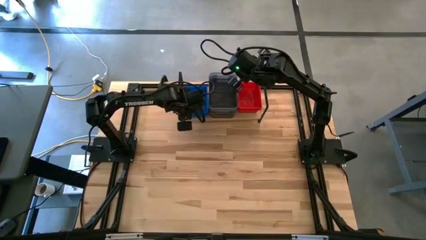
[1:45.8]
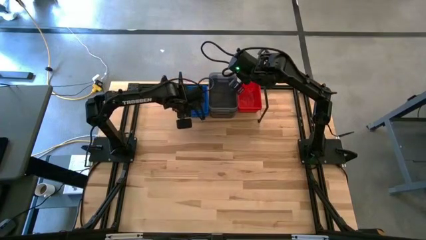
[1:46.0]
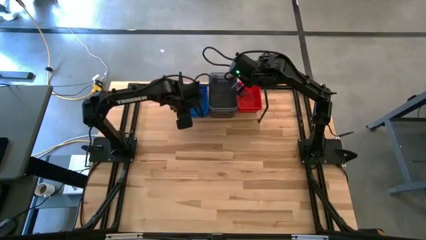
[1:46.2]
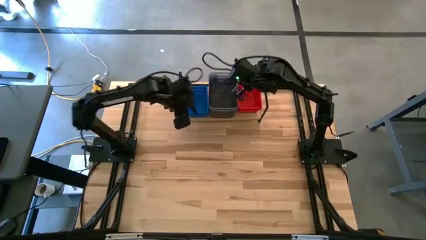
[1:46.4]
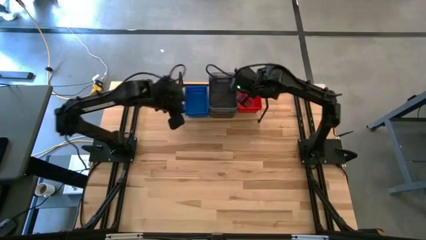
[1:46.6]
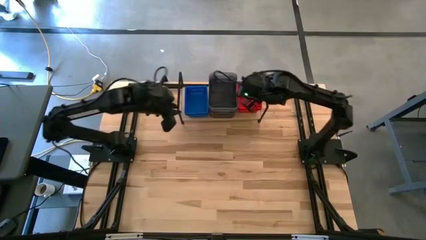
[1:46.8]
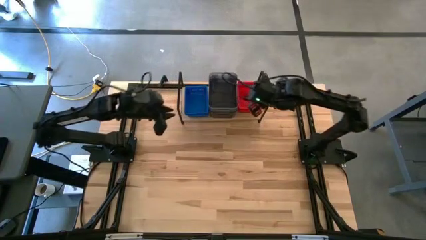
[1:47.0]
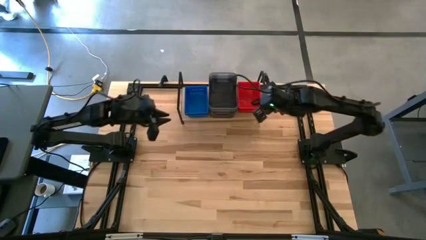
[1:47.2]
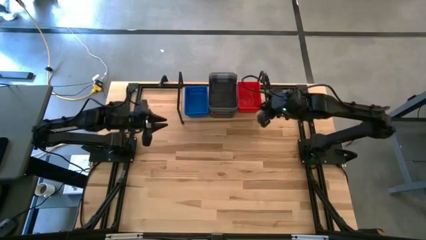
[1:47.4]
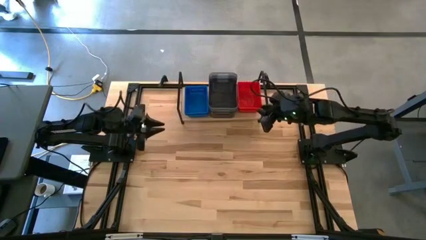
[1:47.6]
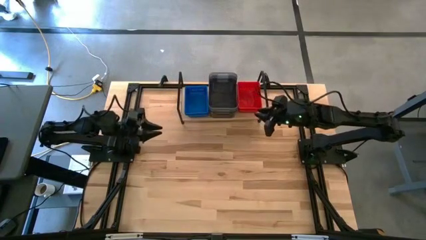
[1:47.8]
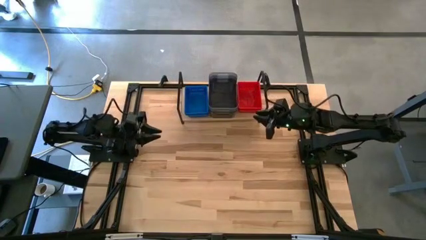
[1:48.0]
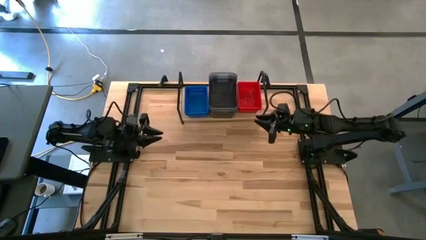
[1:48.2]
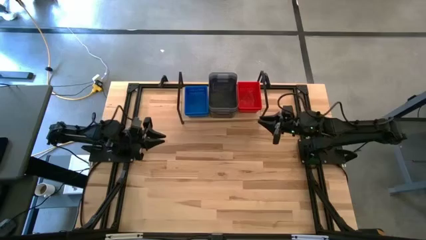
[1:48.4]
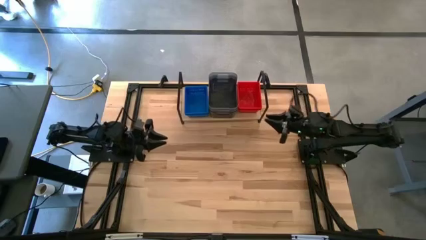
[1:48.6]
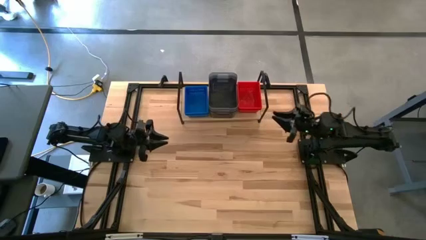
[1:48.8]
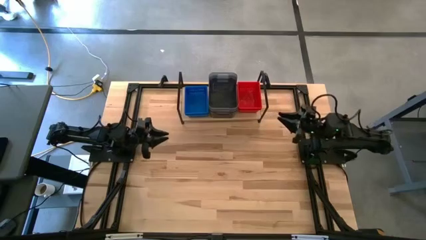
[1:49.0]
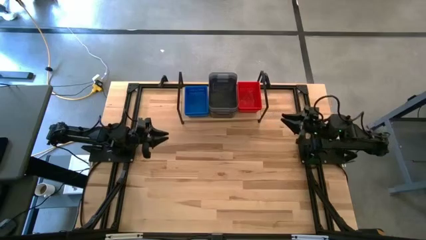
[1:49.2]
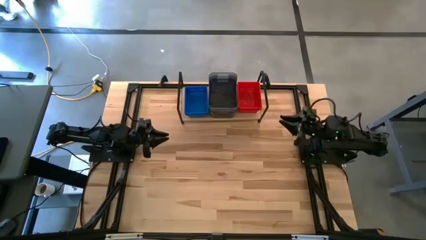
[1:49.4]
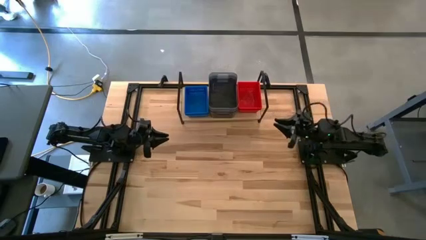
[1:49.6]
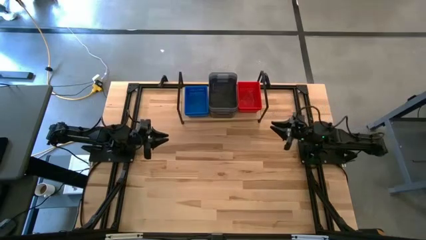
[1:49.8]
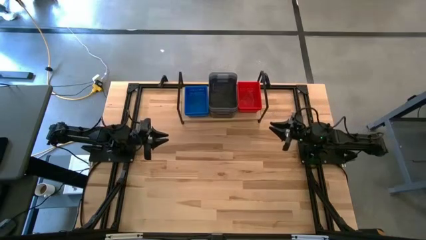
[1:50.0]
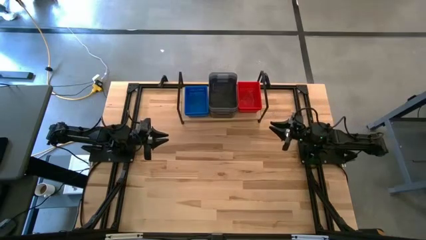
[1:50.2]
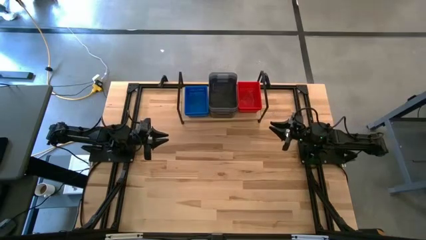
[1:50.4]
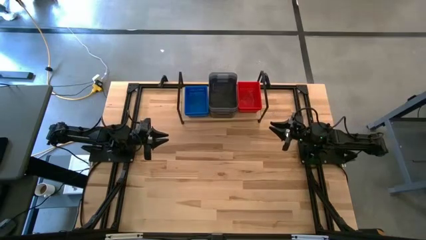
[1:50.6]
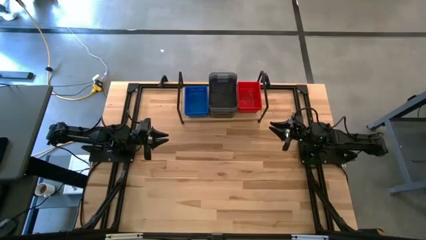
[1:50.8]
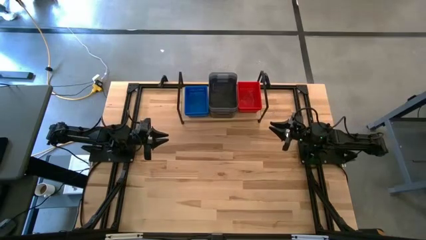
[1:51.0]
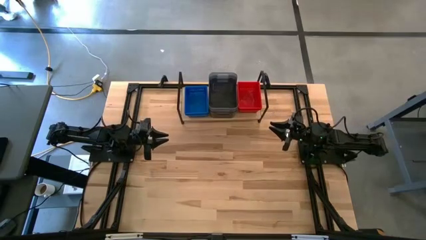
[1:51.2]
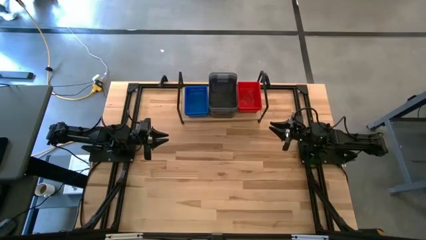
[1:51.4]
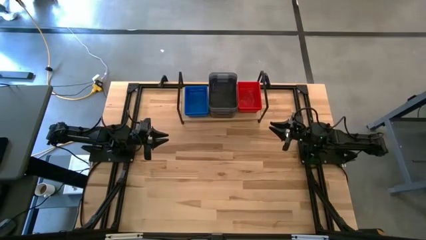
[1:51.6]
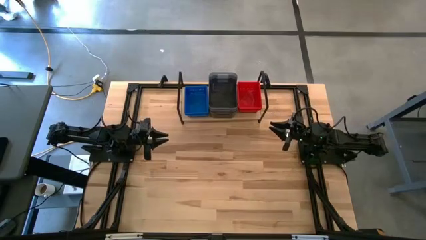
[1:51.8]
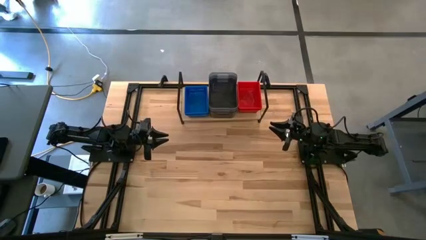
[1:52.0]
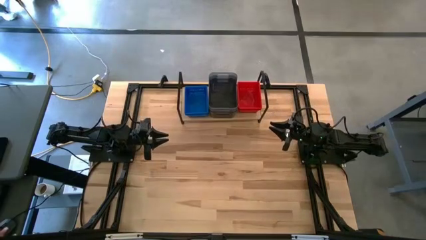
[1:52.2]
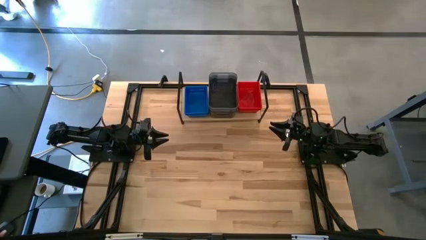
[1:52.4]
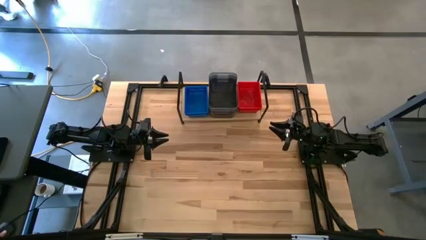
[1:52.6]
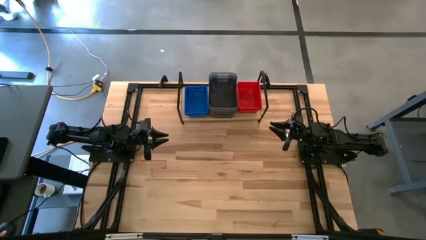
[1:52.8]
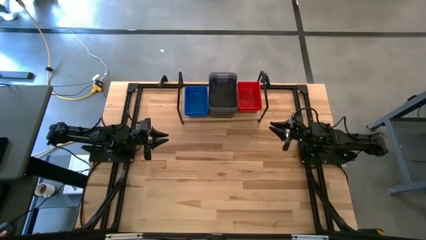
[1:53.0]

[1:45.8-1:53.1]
Task: Stack baskets on shelf by color
Return to Home Position

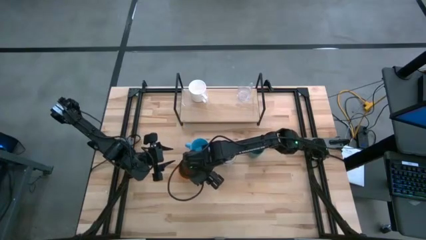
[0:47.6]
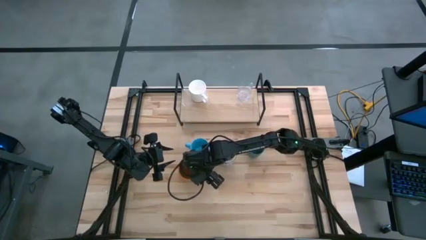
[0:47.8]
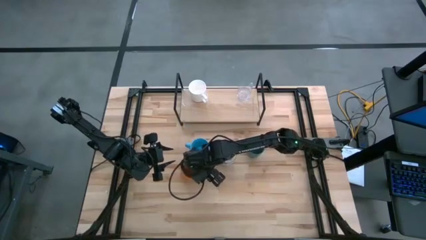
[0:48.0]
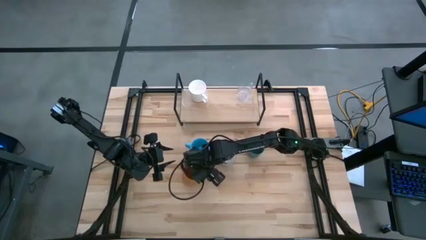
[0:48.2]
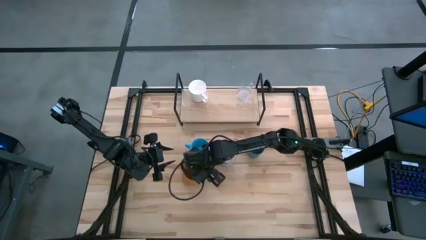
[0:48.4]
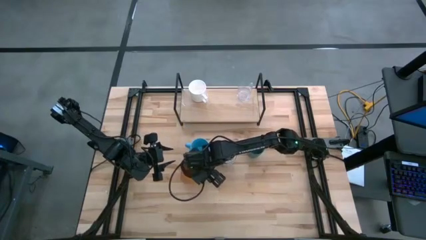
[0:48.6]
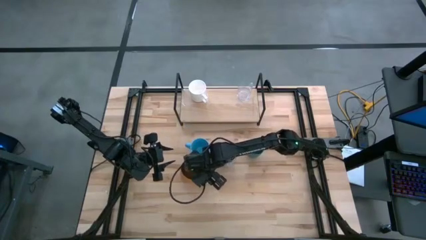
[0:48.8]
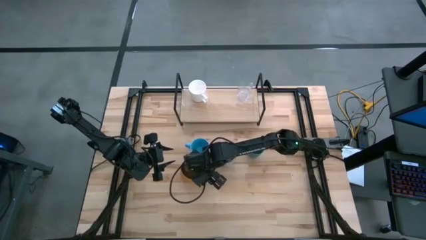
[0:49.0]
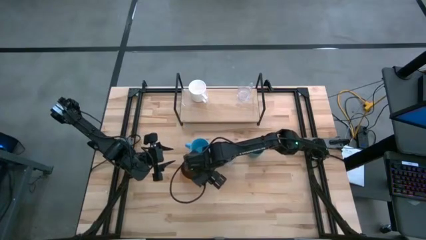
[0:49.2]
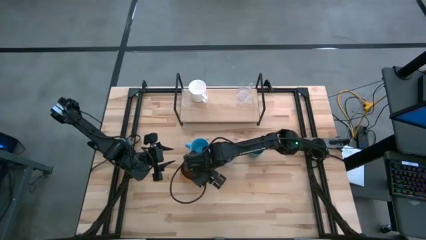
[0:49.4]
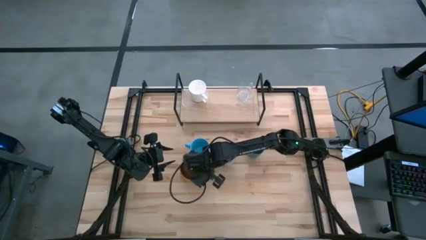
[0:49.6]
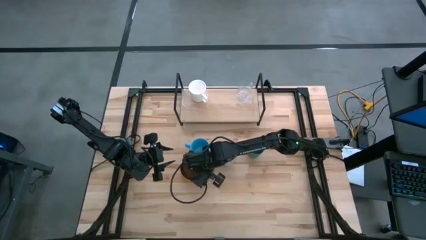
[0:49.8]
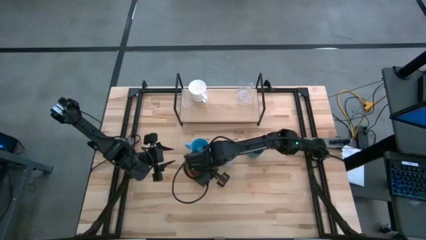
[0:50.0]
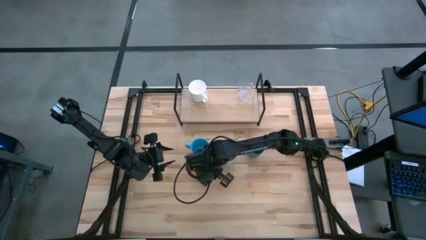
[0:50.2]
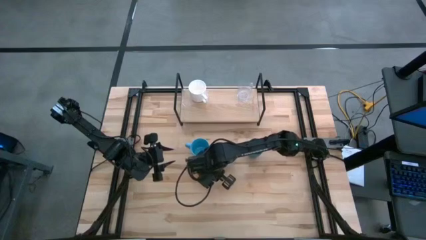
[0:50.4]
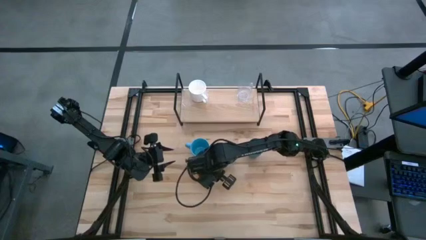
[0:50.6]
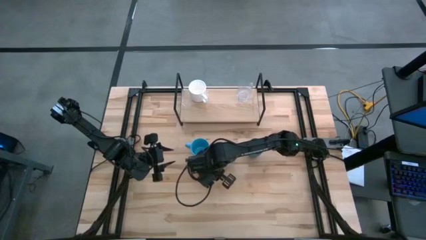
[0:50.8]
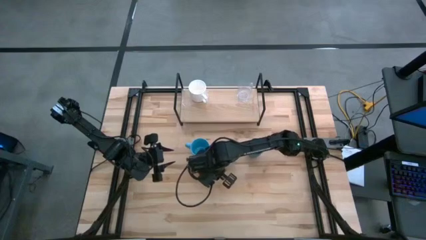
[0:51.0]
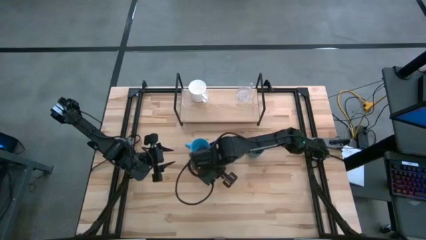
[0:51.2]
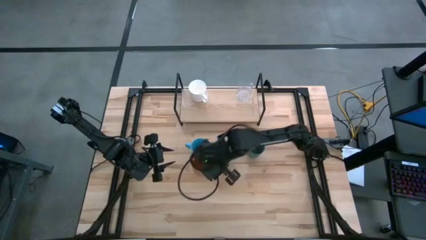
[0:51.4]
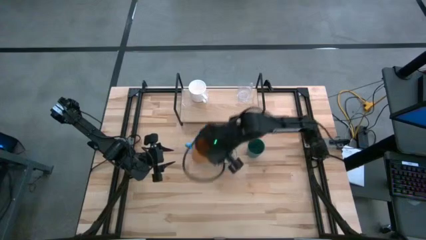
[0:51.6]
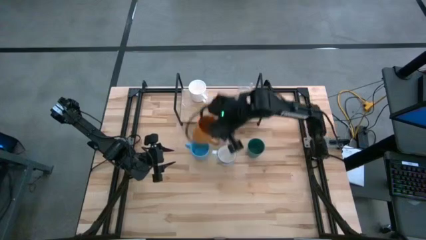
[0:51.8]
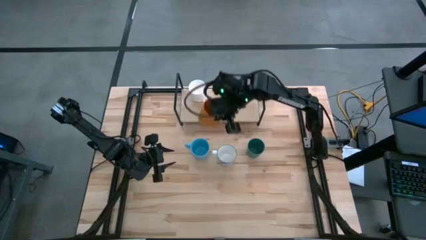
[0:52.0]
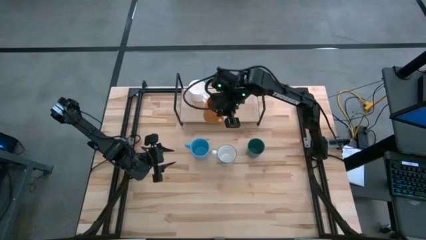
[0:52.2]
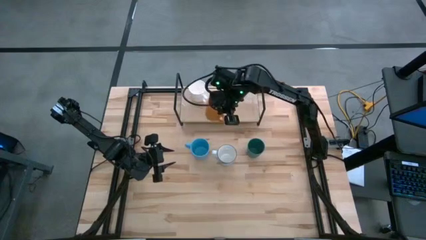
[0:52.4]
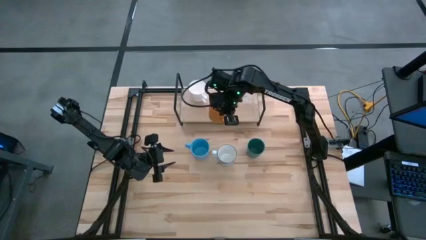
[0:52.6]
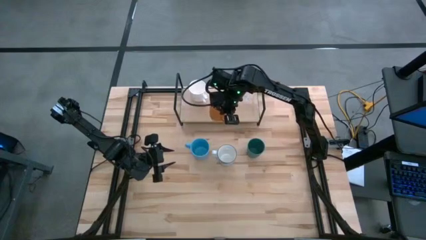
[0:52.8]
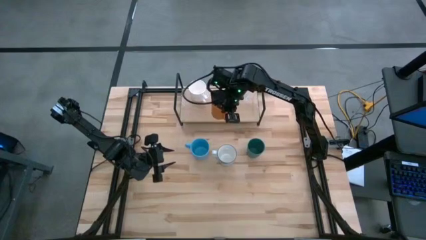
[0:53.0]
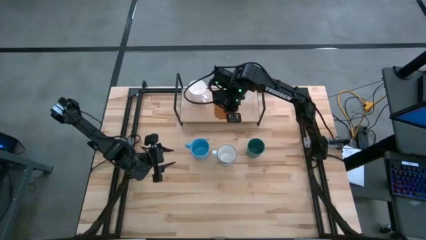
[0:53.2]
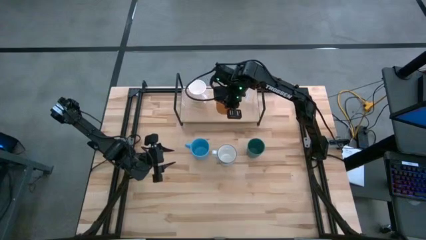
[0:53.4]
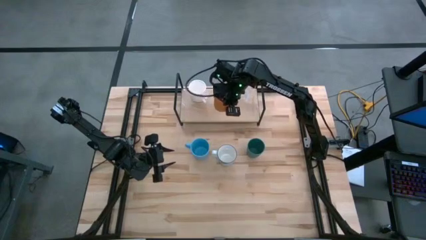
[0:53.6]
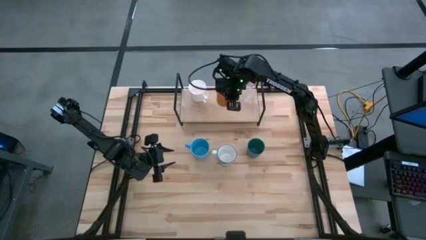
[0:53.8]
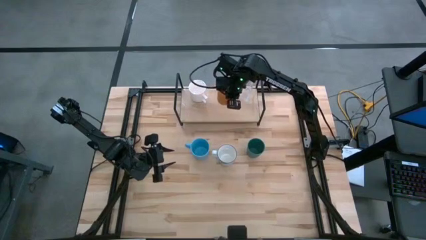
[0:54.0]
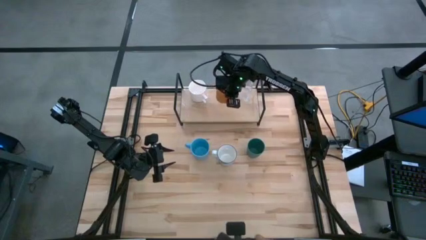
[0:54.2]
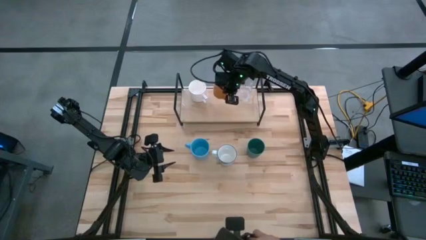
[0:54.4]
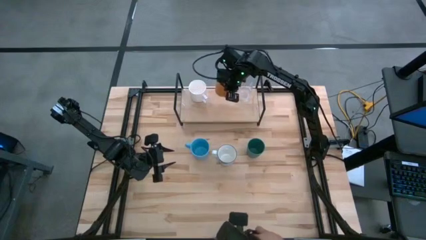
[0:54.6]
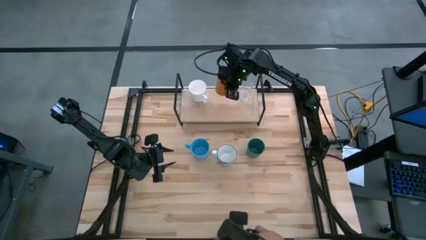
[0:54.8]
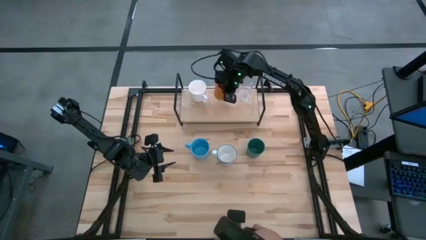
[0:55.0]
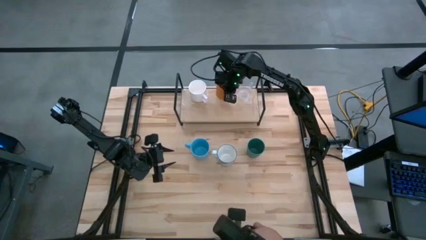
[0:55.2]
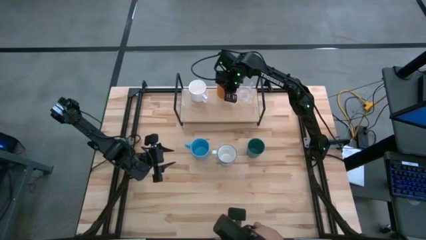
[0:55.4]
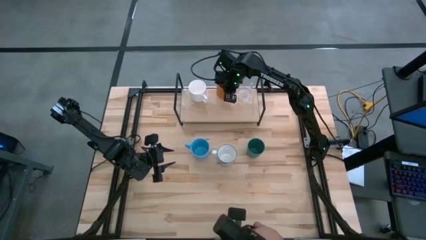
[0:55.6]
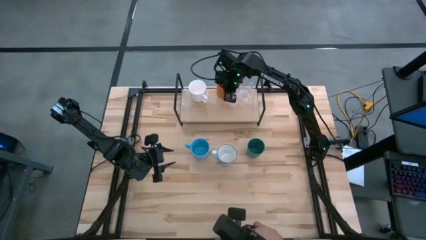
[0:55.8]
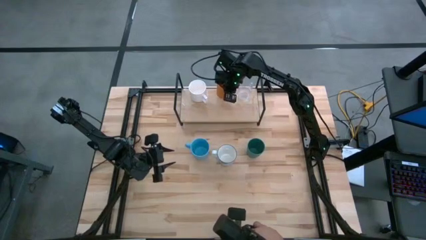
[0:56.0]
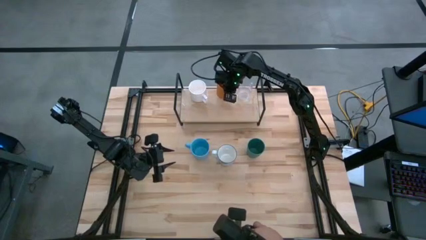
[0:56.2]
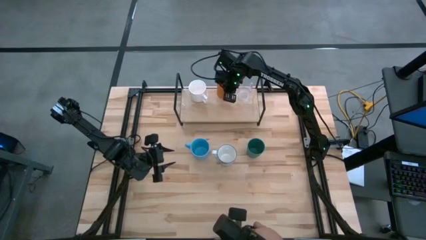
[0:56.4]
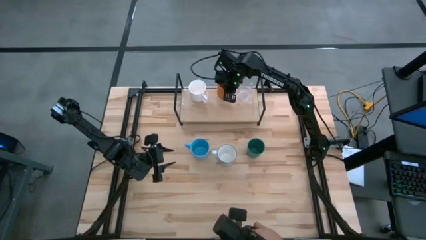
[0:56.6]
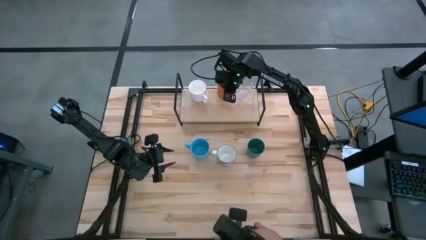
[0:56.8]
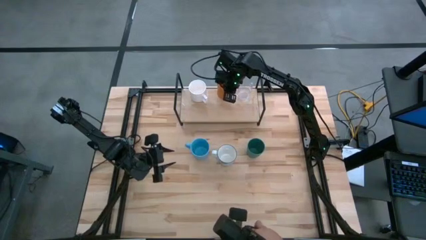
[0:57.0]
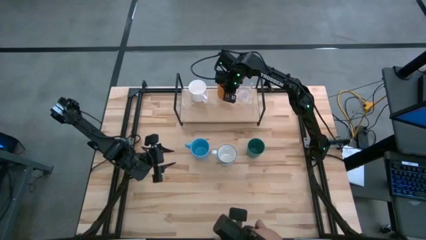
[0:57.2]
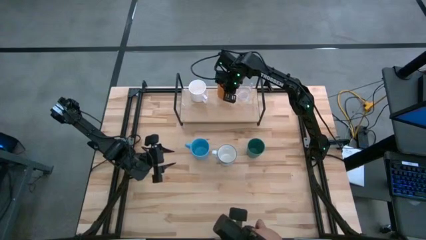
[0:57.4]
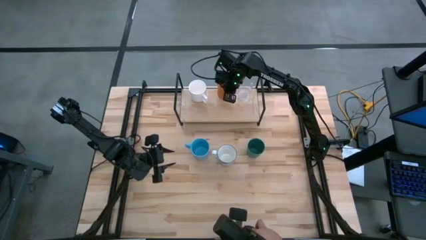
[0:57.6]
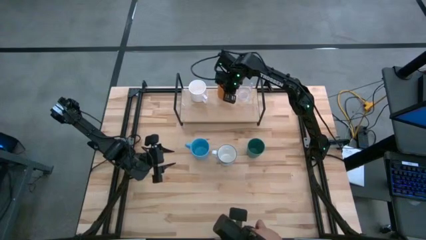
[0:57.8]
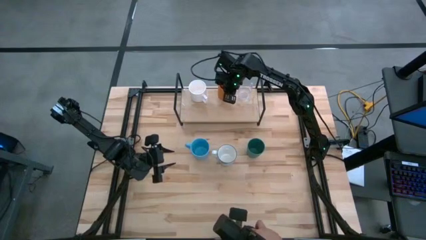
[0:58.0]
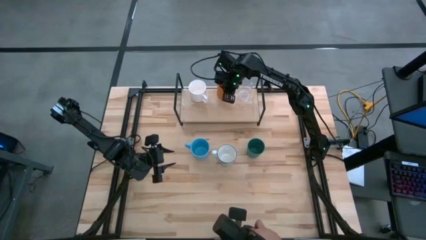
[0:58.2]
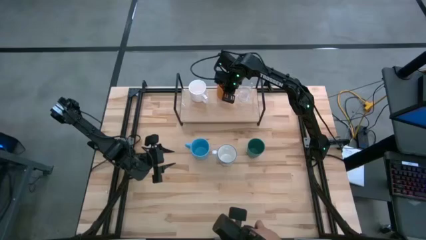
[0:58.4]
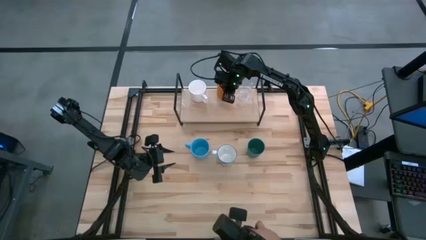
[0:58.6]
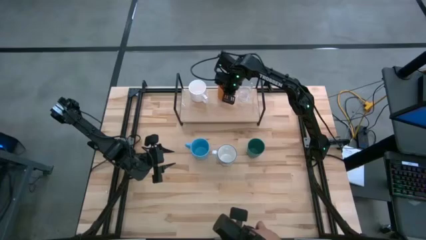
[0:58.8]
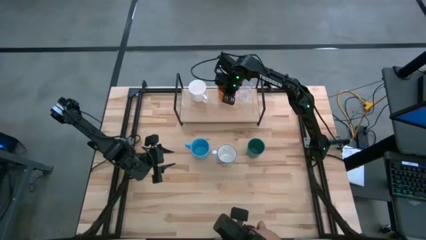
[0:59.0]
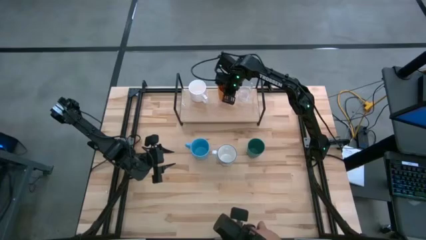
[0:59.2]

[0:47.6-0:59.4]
Task: Stack small to large cups/mugs on shelf
Put the orange mug on the shelf
